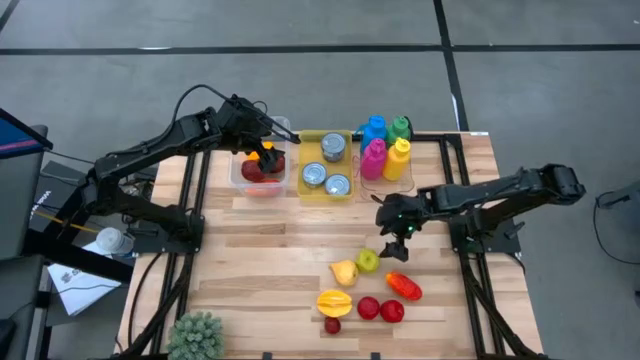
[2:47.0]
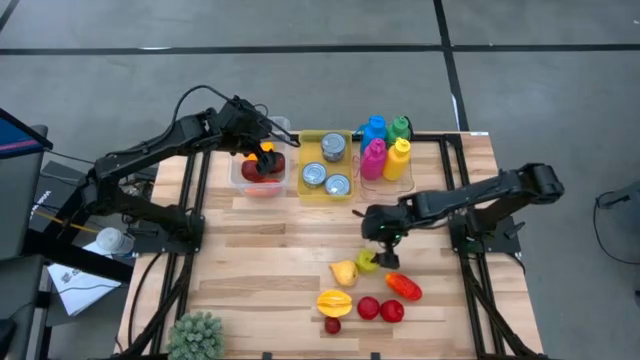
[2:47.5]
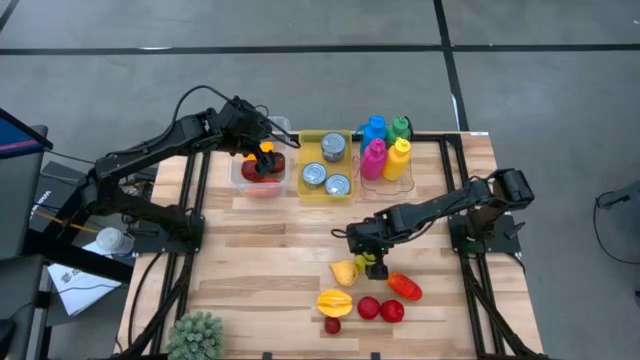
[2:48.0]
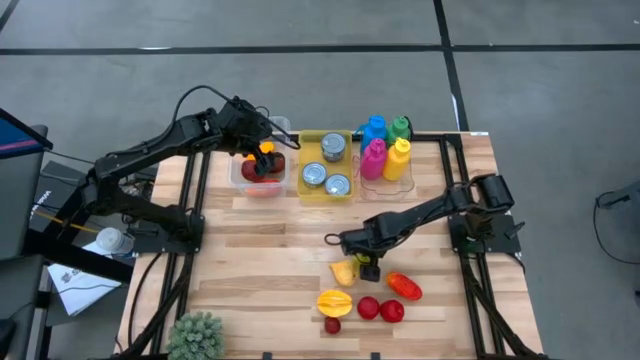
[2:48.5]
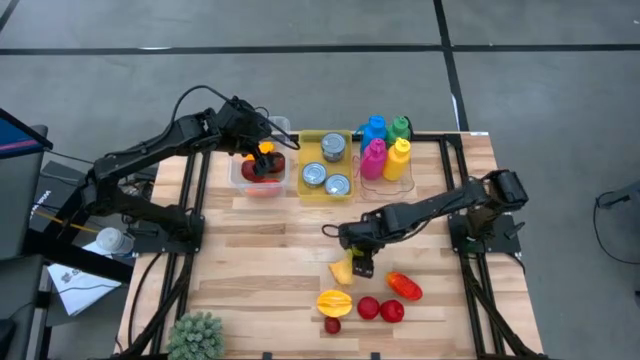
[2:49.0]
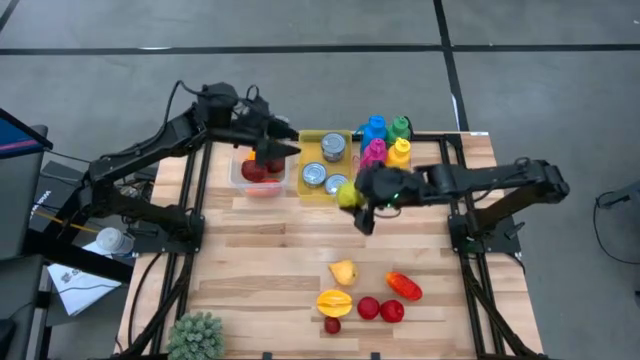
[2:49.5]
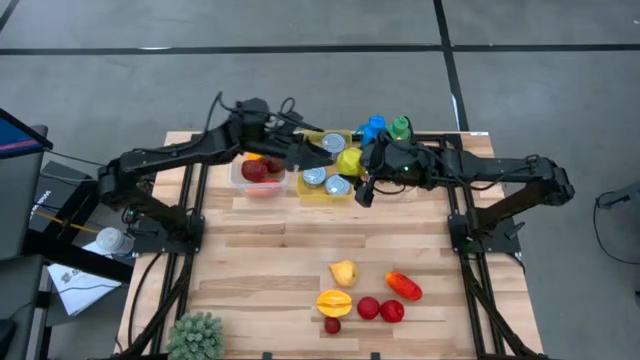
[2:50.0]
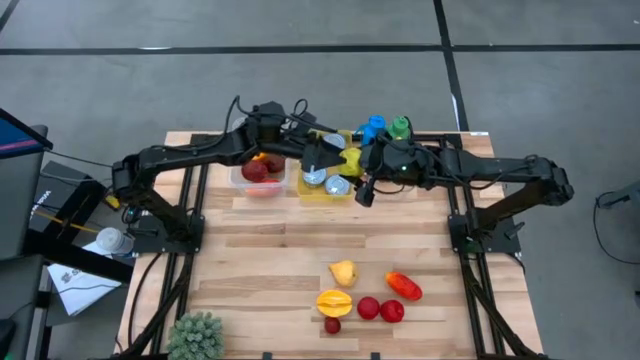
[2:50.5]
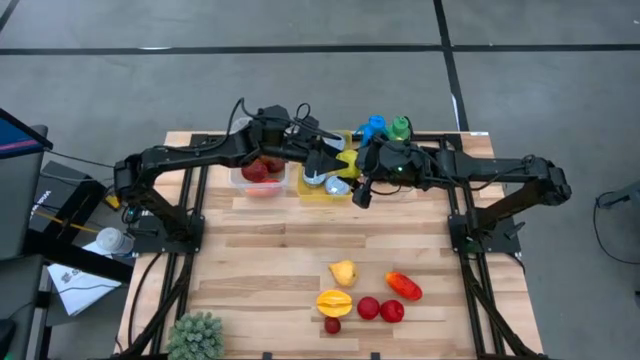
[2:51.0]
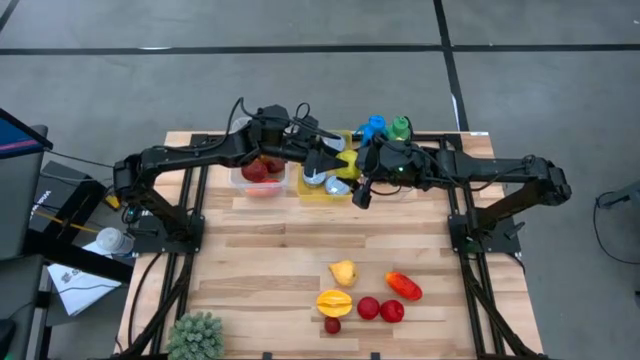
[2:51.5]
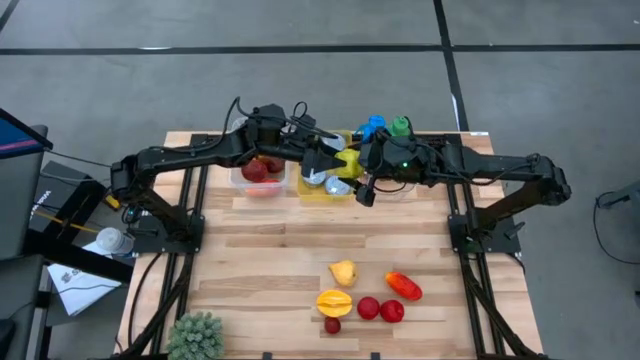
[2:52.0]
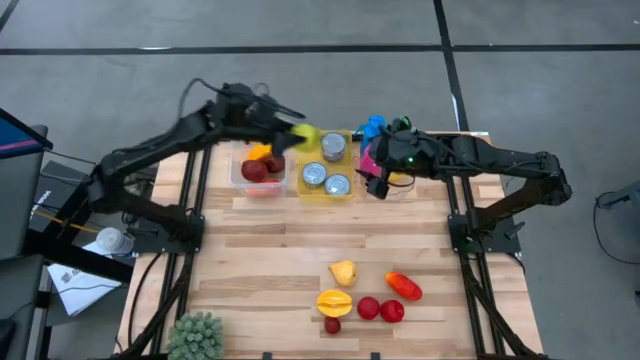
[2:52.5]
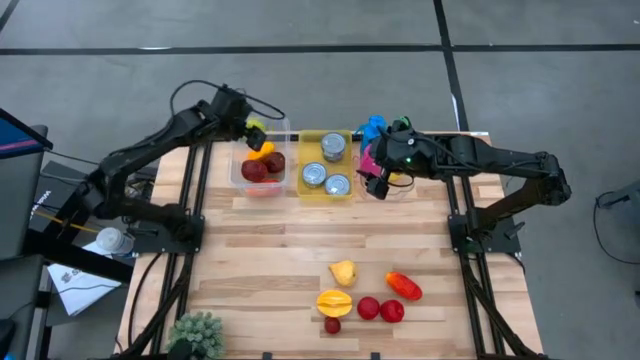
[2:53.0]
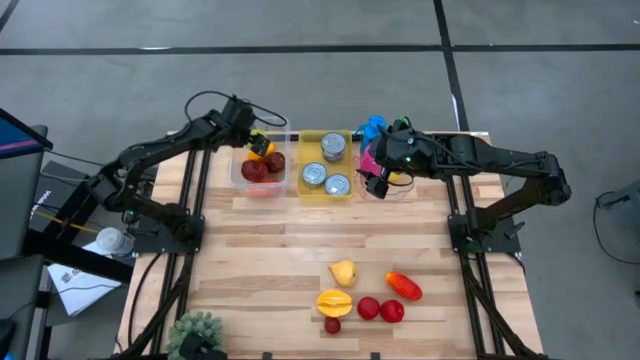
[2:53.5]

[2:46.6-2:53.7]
Task: Pick & Place Food Item
Put the green apple into the transparent container

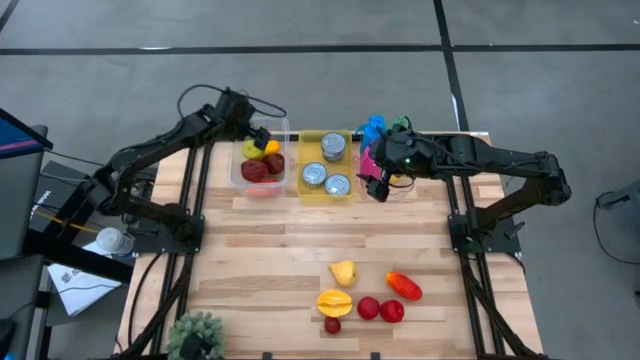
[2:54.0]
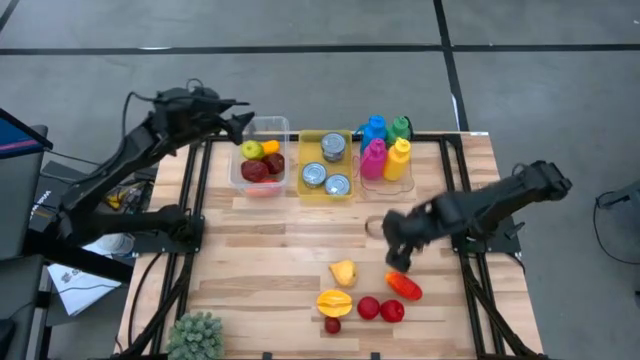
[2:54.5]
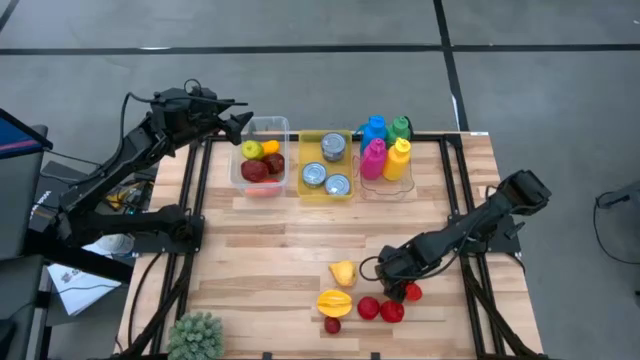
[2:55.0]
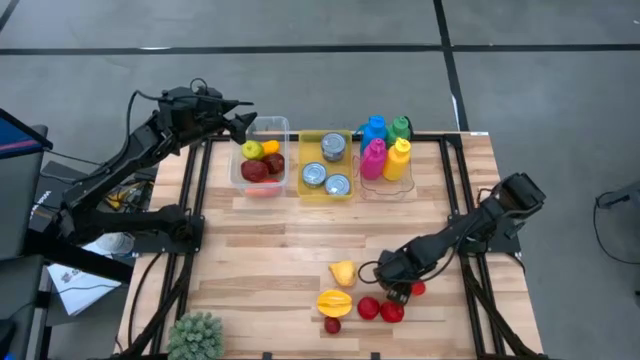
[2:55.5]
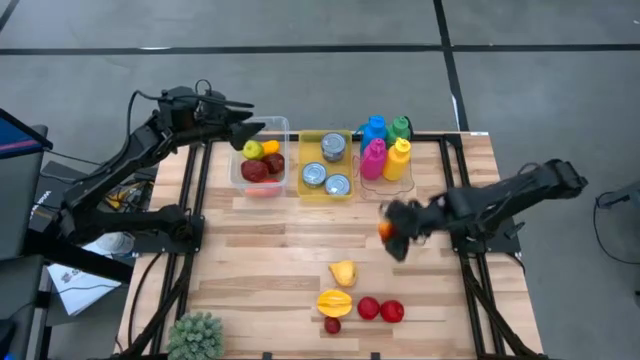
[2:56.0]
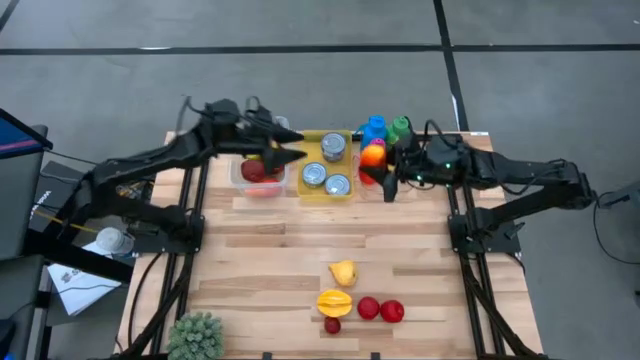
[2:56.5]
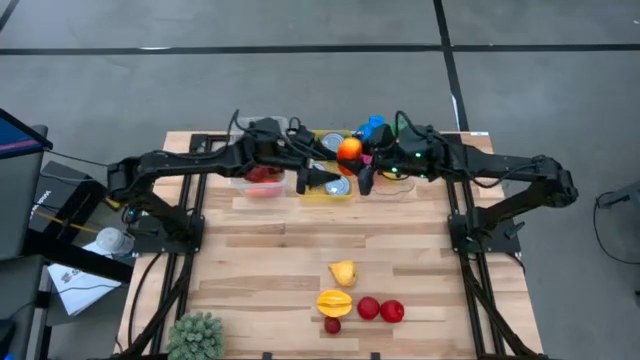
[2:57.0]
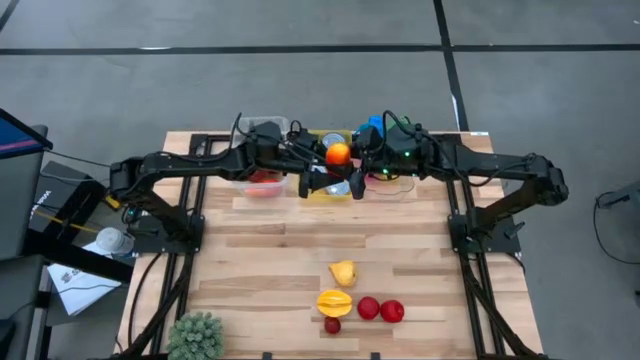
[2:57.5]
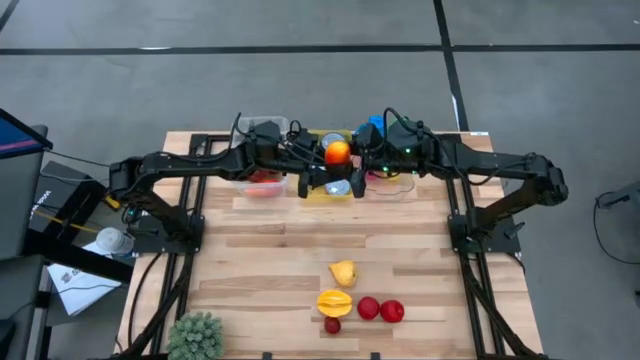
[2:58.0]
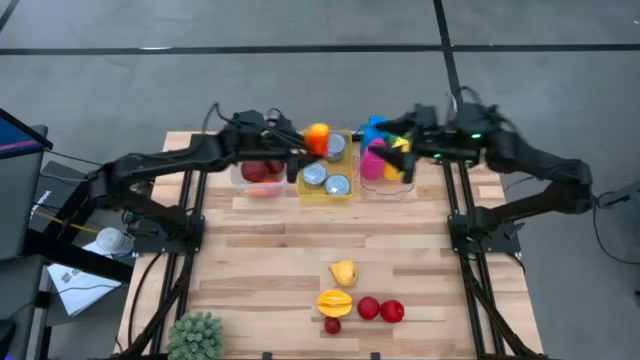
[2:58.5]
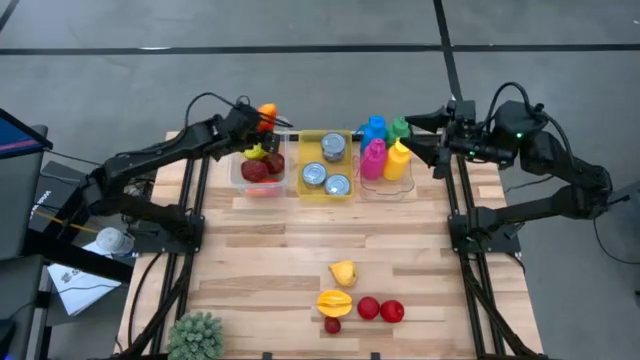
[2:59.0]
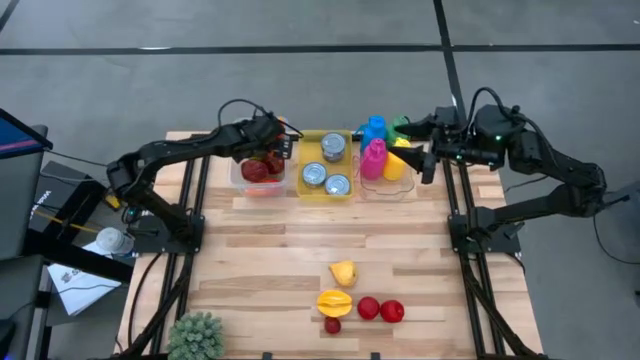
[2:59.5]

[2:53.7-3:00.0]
Put the red mango into the transparent container

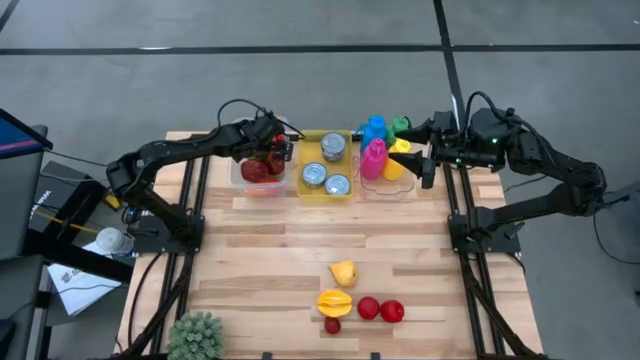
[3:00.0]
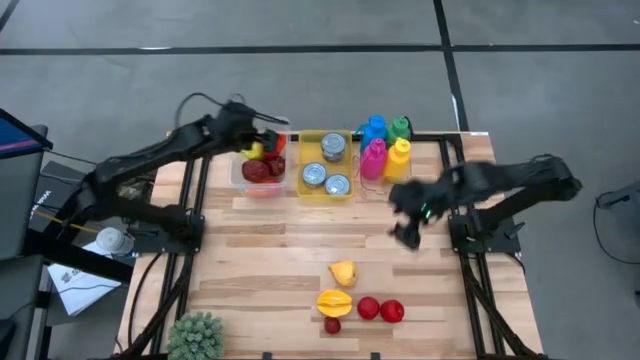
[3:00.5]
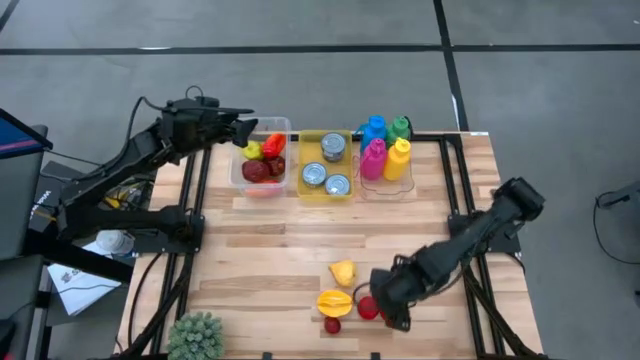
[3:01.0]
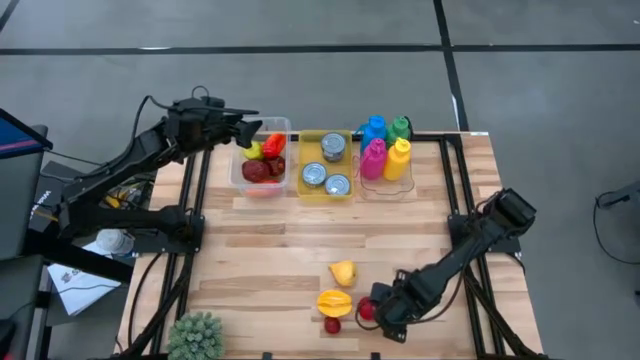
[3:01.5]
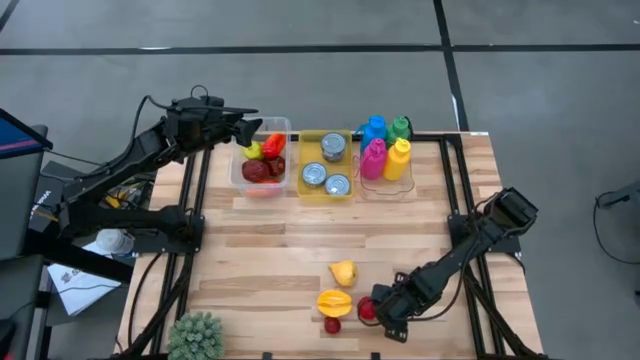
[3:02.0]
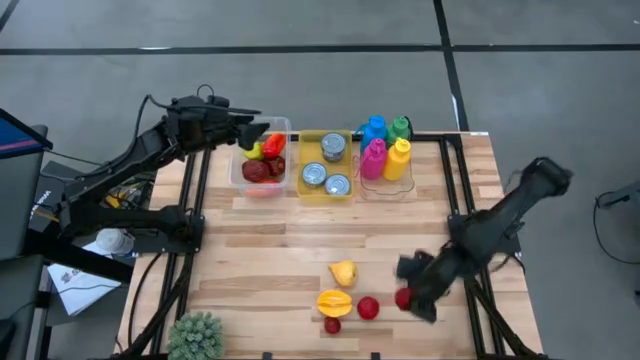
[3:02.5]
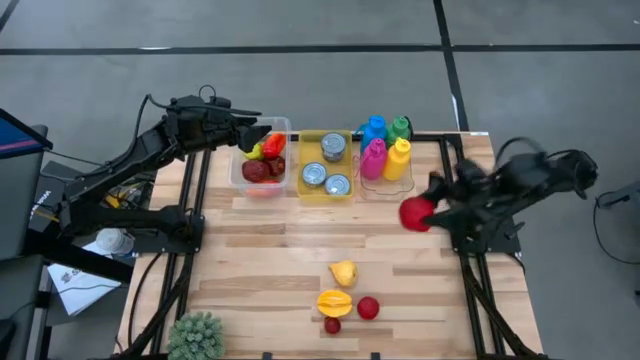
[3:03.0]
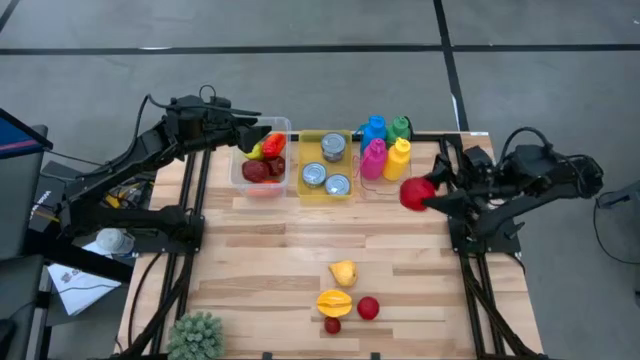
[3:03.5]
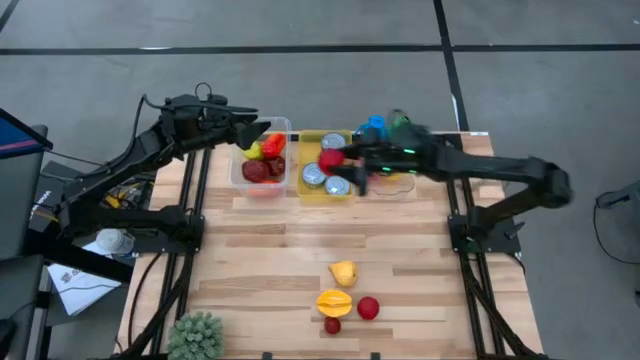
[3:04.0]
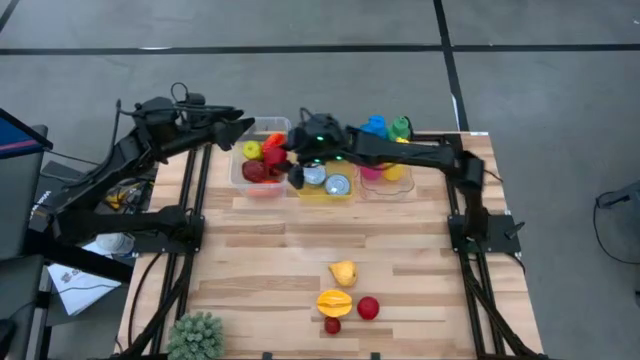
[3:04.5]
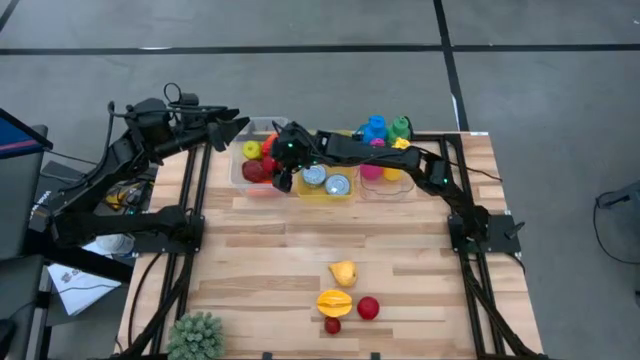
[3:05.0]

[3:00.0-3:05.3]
Put the tomato into the transparent container

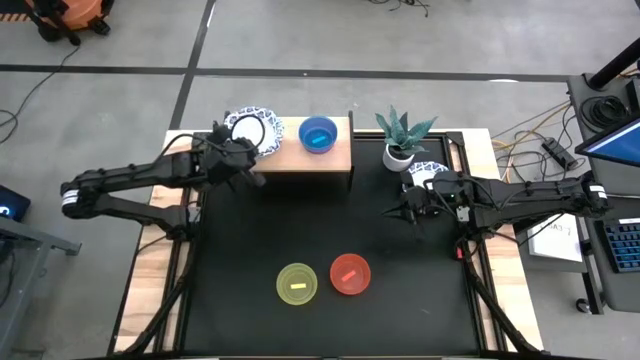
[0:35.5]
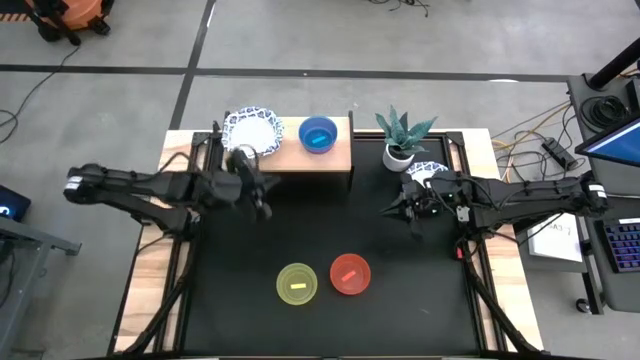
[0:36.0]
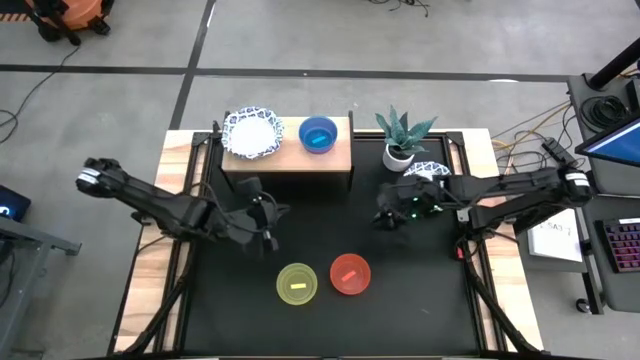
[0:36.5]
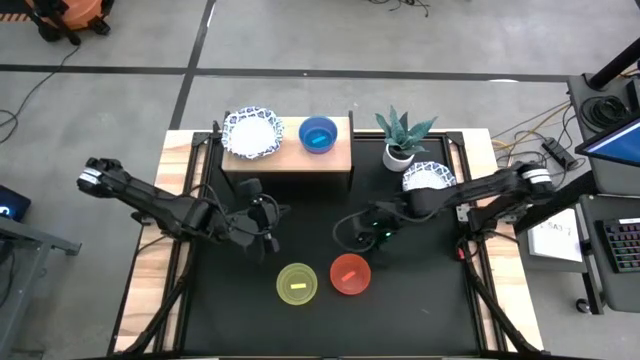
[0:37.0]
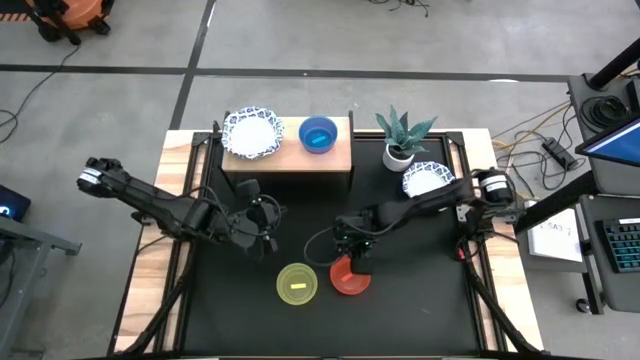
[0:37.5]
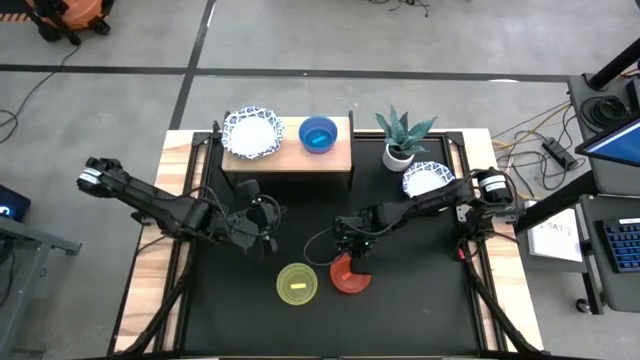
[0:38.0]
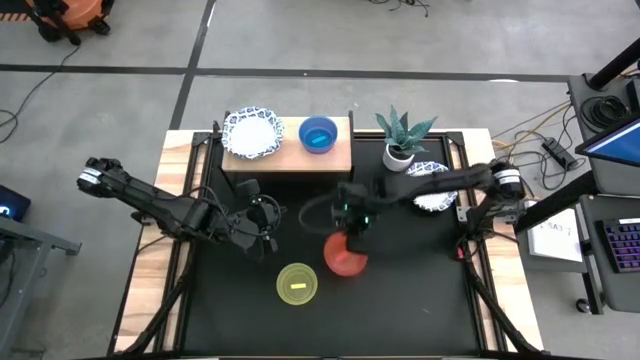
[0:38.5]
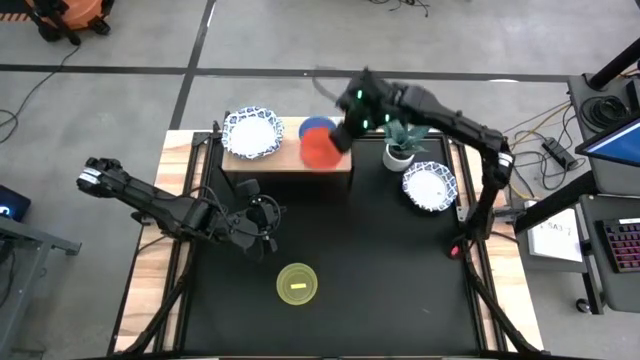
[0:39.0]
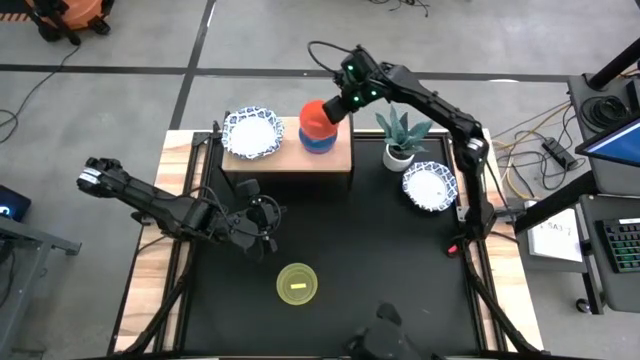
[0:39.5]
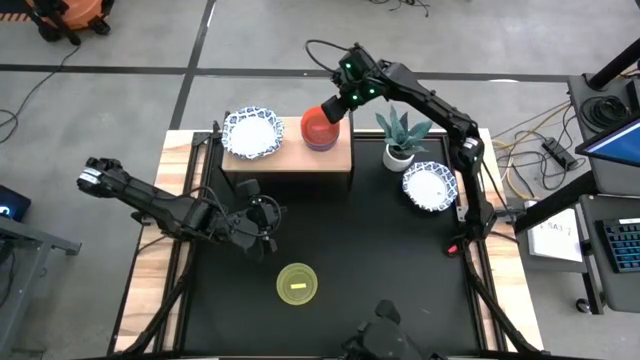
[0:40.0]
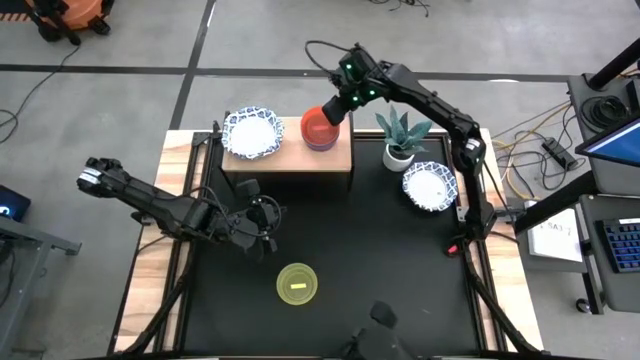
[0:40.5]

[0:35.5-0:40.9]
Task: Place and stack bowls onto a shelf
Stack the orange bowl on top of the blue bowl on the shelf
